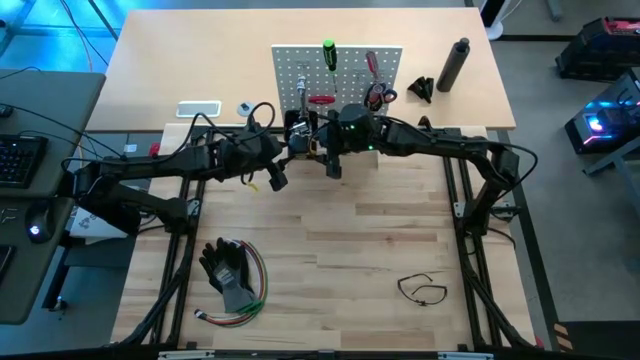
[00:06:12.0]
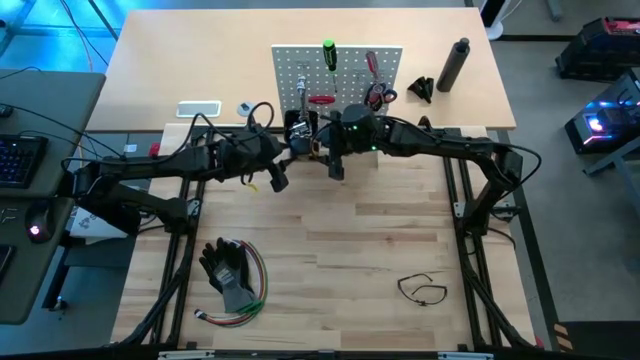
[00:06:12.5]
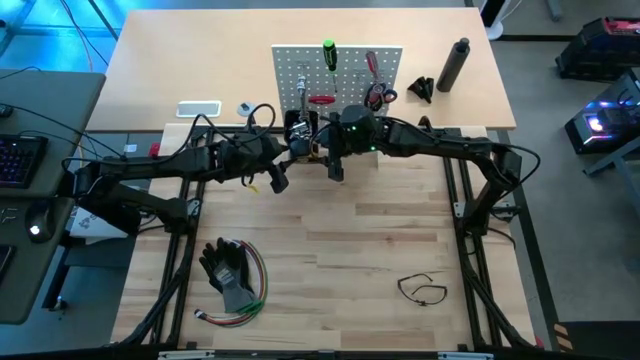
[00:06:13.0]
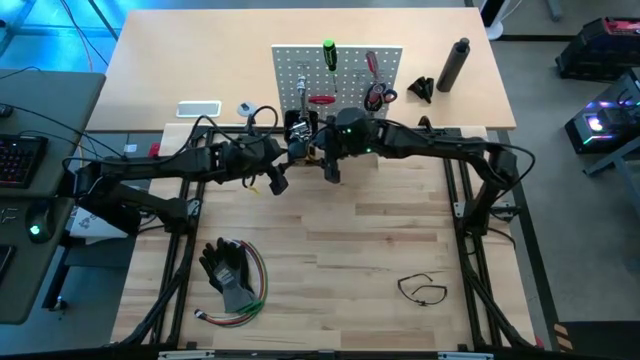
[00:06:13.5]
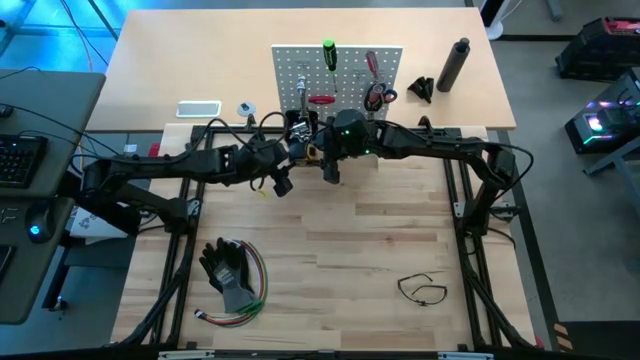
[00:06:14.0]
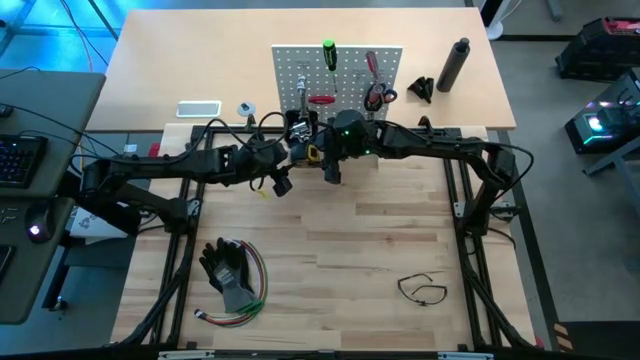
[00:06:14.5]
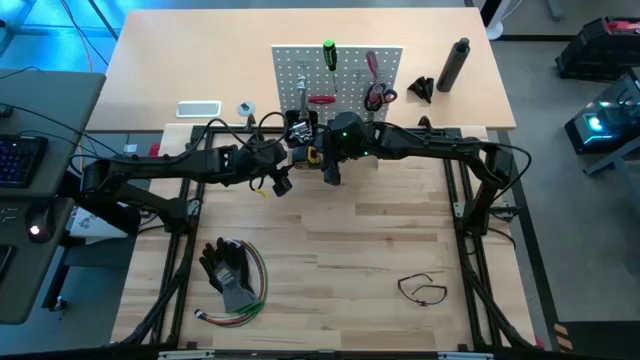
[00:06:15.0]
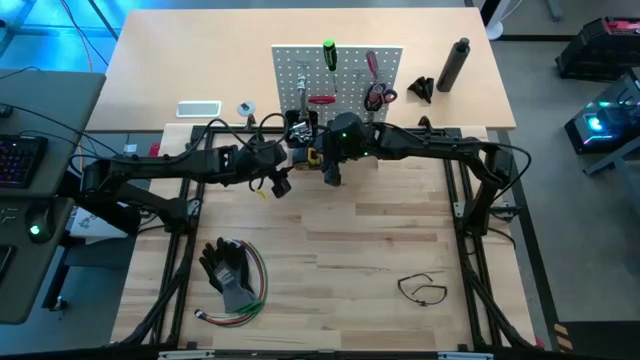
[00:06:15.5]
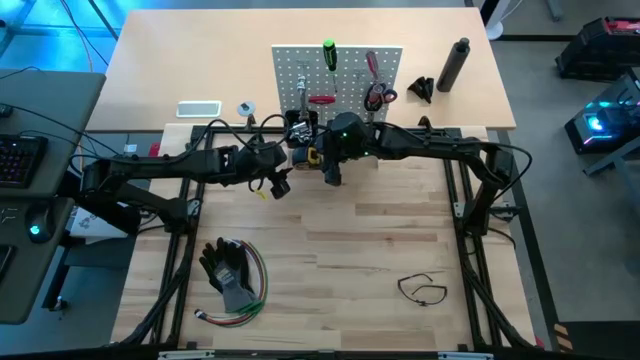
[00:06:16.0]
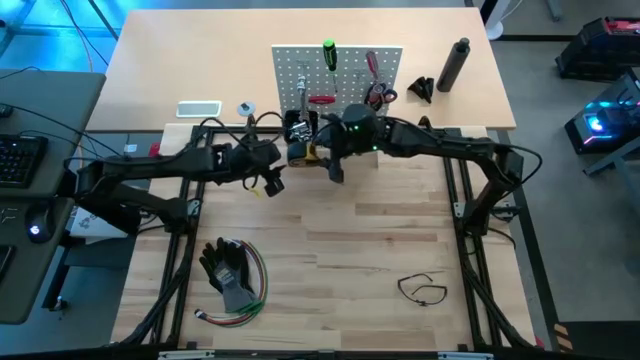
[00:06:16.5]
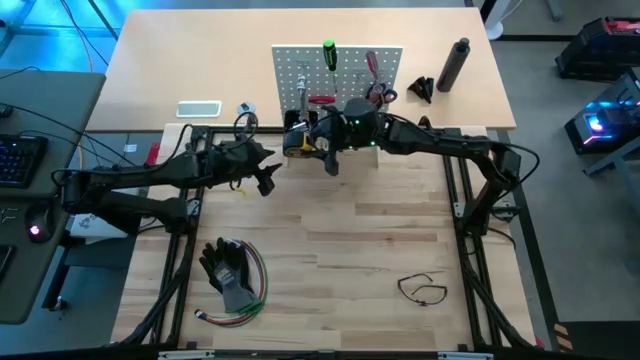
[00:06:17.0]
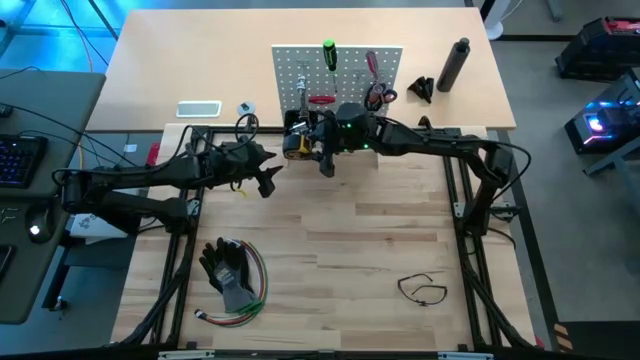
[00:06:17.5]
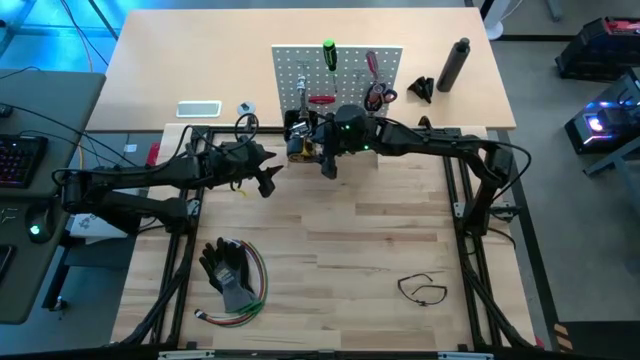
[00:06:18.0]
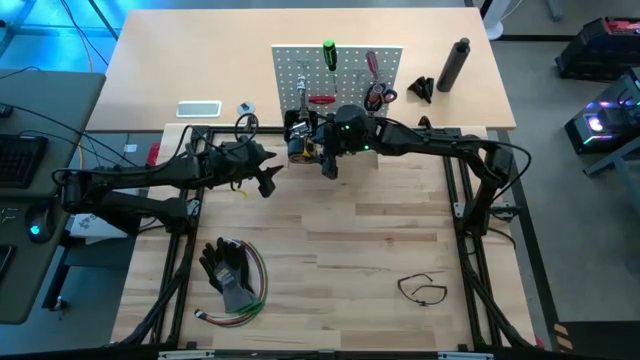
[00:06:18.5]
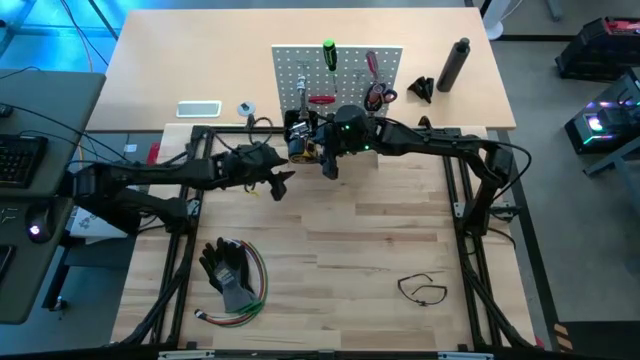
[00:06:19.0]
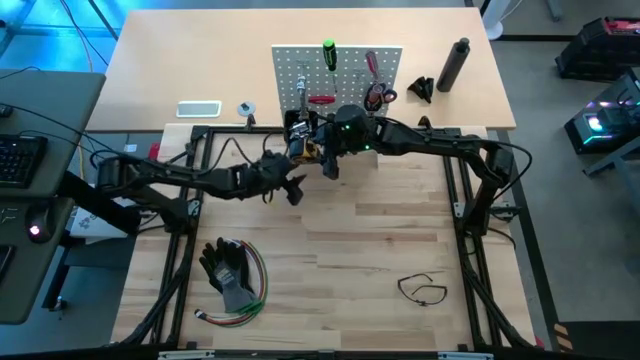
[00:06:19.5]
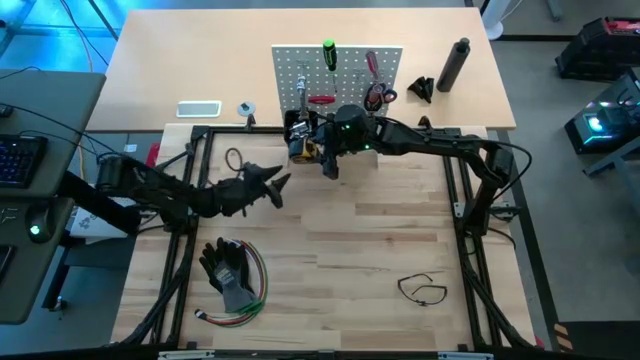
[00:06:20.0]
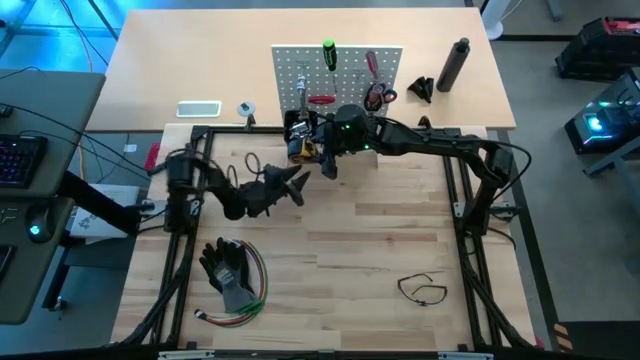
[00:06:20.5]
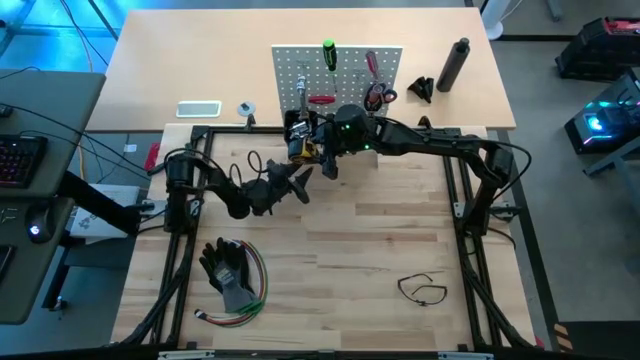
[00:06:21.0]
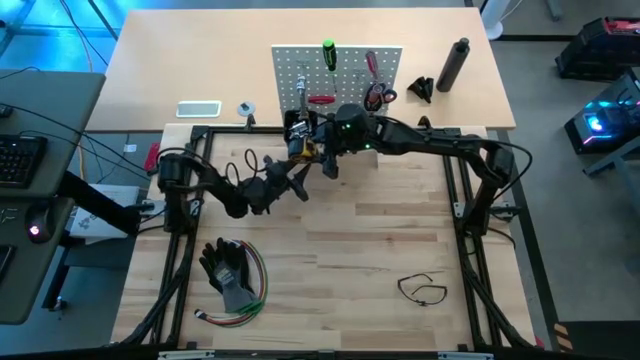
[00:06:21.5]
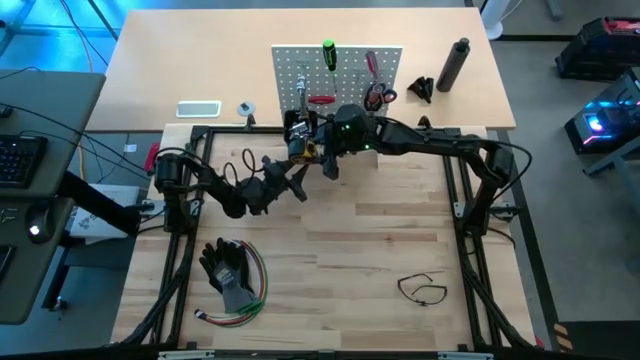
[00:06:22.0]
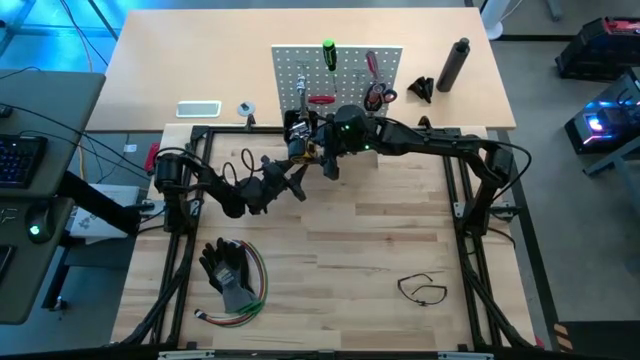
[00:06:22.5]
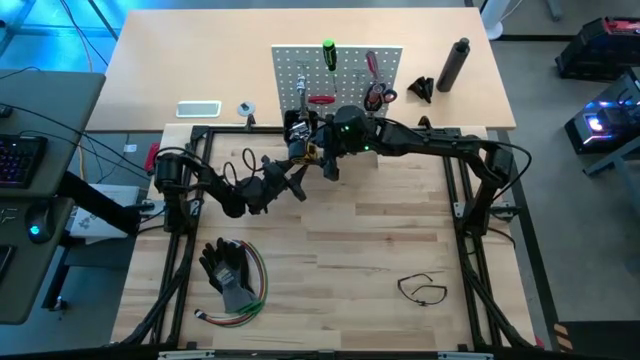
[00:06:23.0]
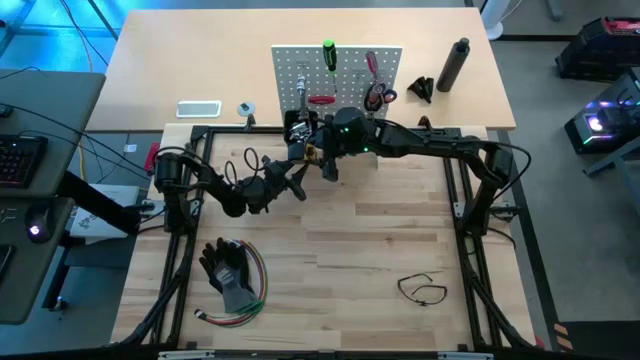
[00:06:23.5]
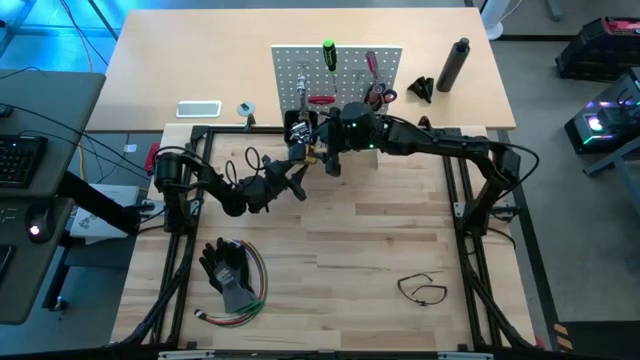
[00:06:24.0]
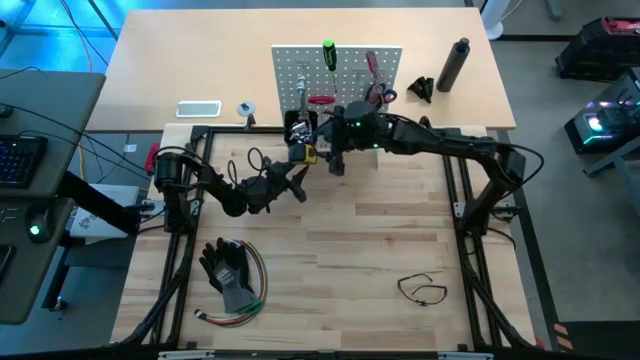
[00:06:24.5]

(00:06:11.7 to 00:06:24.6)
Task: Hang tools onto peg board
Hang the yellow tape measure on the black bin on the white peg board

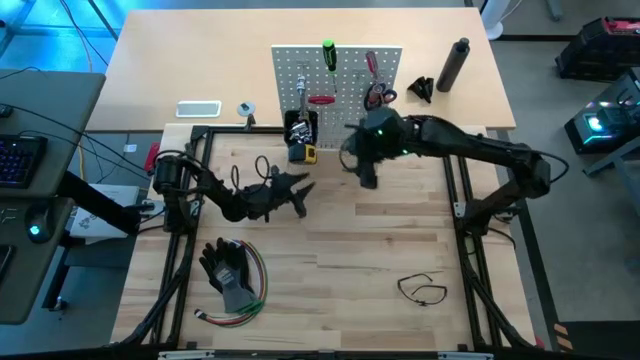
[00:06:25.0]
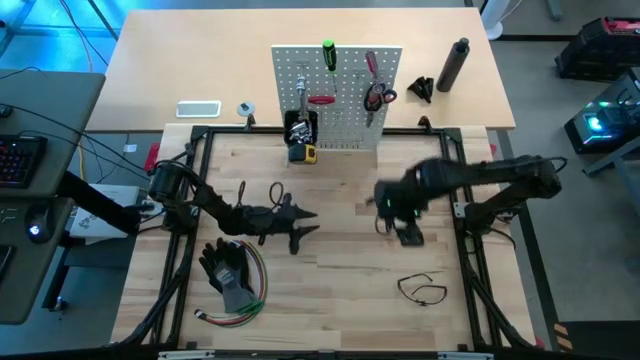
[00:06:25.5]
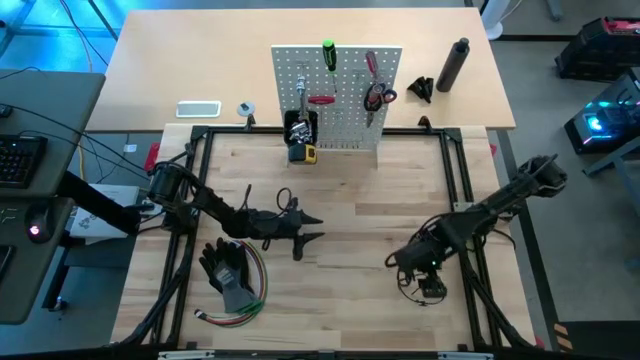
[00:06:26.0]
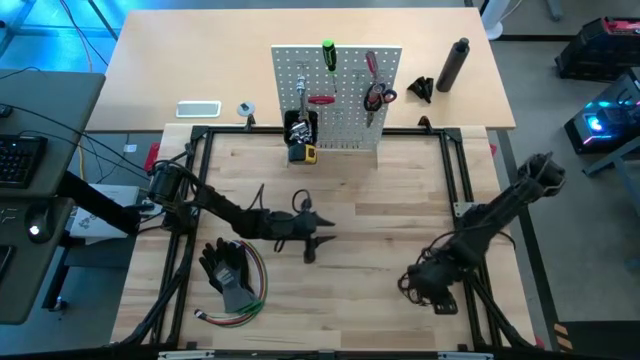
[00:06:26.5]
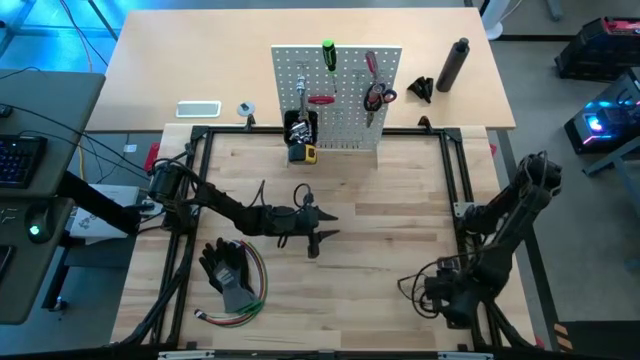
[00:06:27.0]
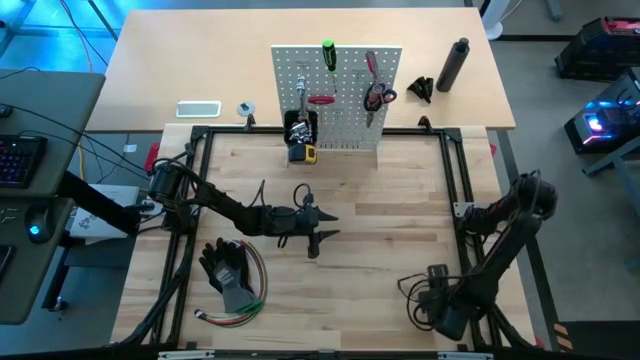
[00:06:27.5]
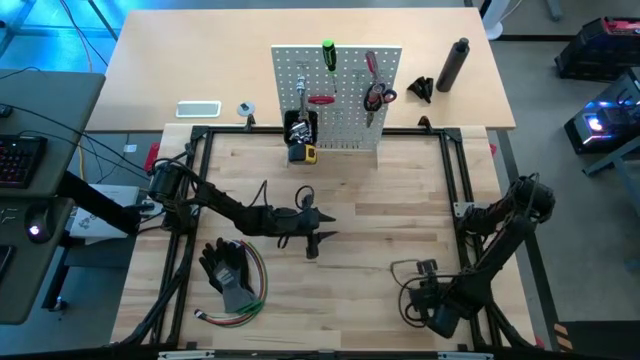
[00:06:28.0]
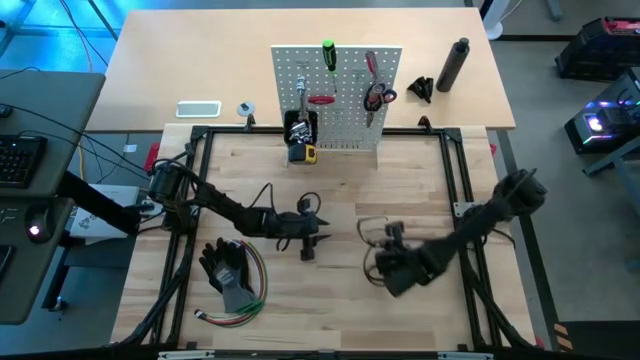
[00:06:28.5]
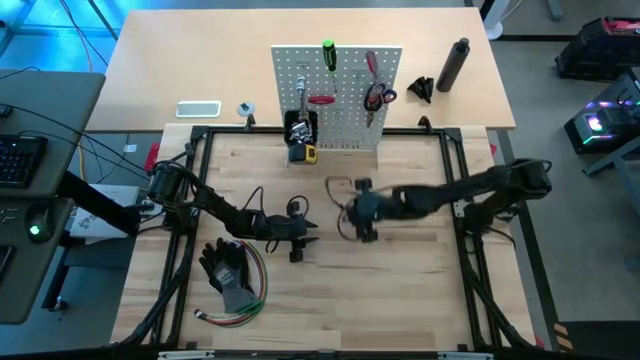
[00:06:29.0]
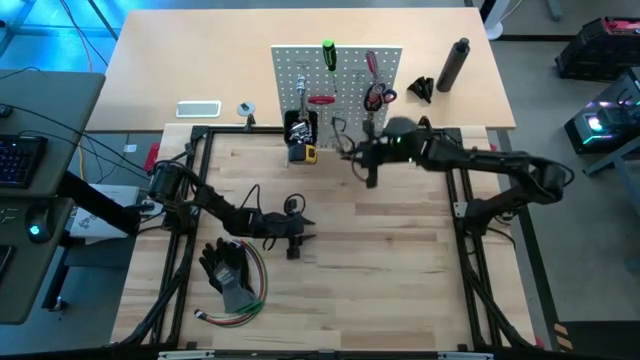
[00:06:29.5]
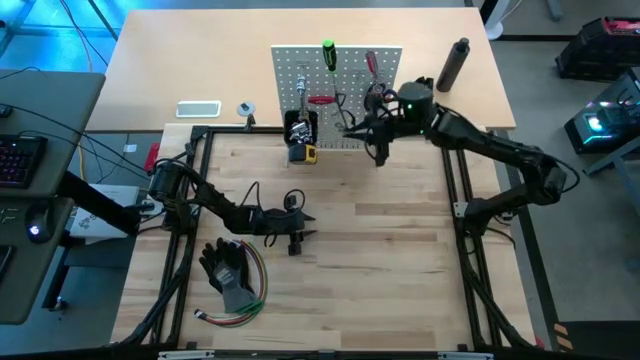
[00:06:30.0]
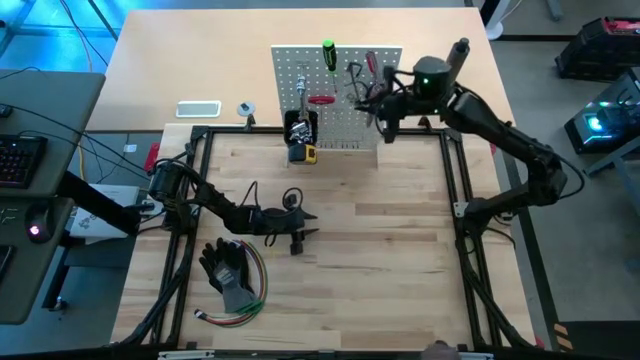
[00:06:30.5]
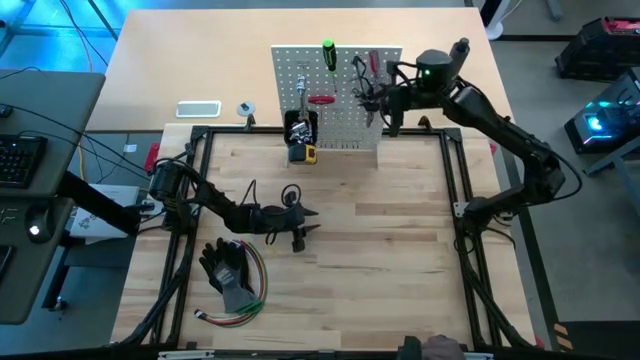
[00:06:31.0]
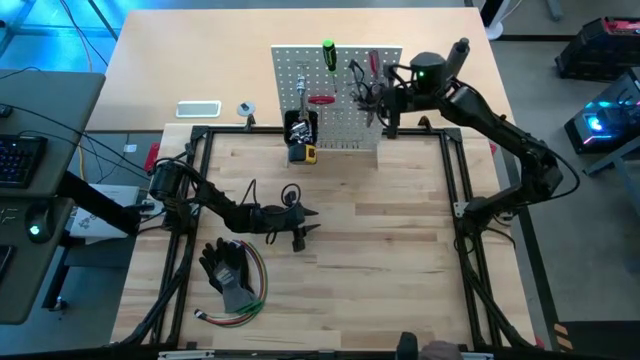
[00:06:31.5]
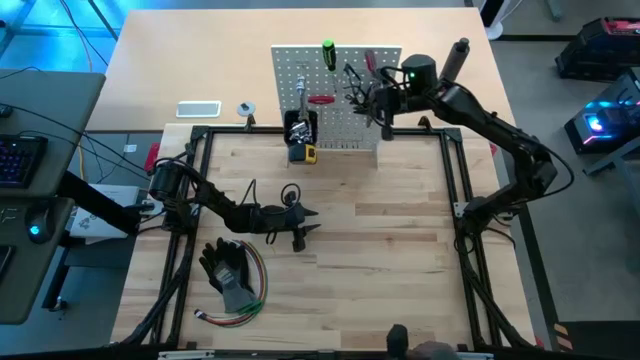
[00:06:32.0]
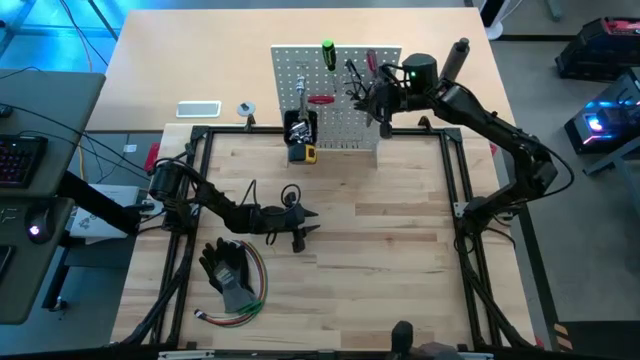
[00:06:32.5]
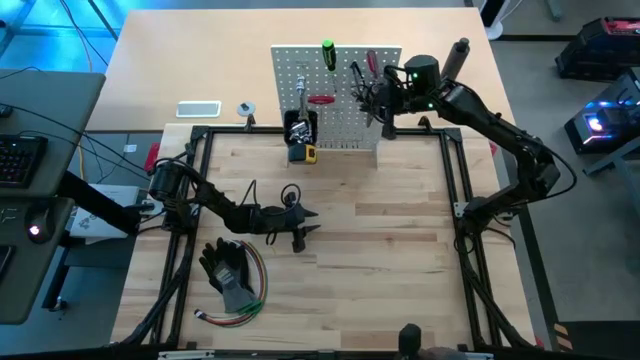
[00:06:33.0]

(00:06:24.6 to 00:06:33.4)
Hang the black safety goggles on the white peg board
